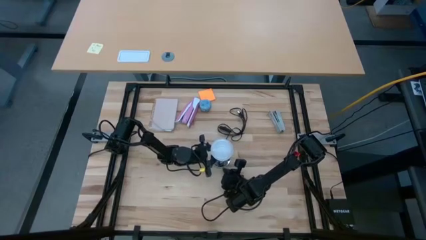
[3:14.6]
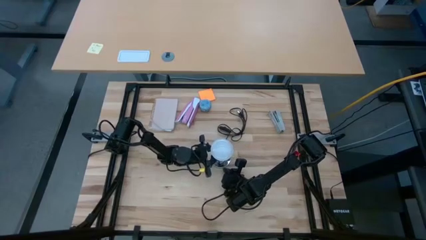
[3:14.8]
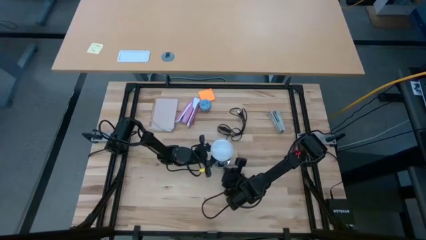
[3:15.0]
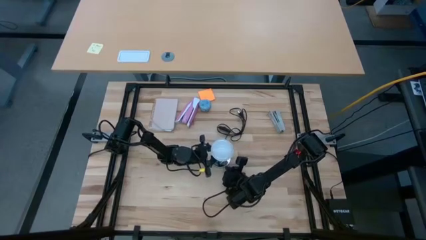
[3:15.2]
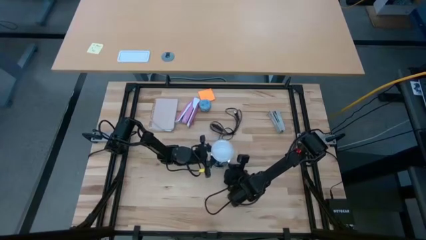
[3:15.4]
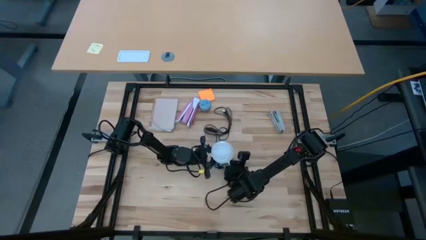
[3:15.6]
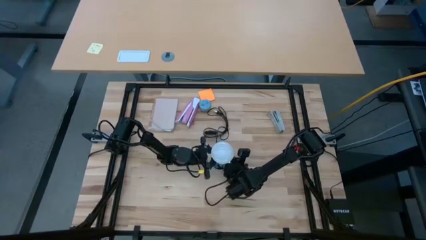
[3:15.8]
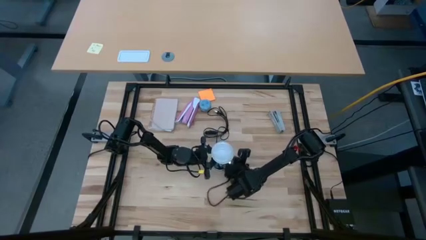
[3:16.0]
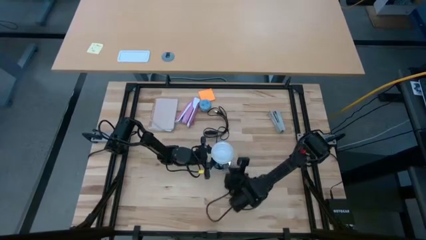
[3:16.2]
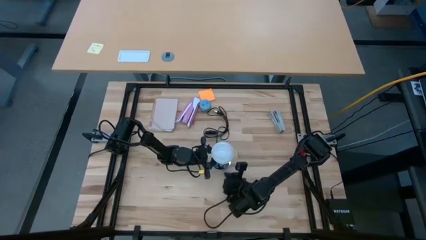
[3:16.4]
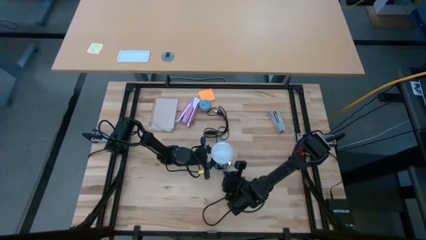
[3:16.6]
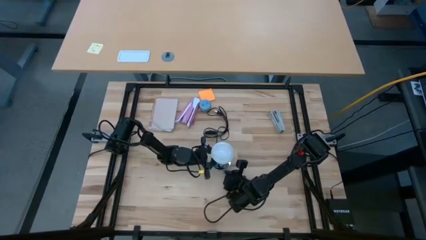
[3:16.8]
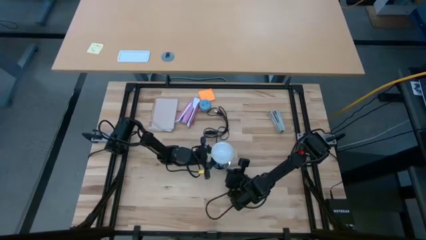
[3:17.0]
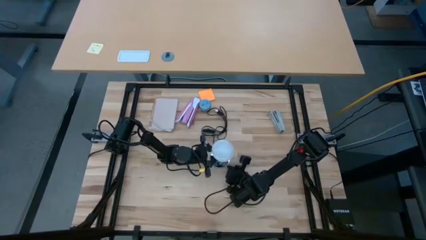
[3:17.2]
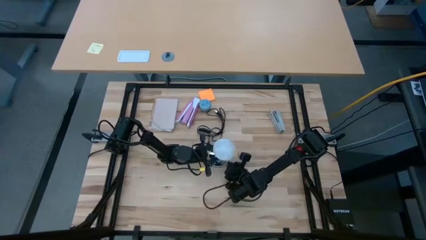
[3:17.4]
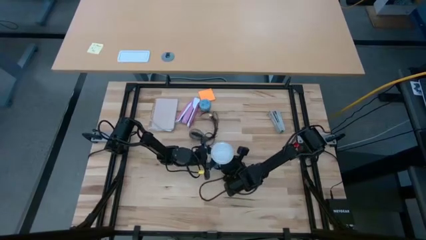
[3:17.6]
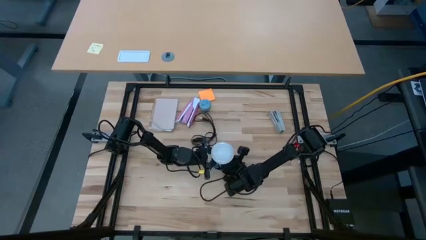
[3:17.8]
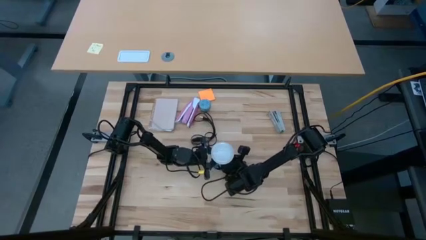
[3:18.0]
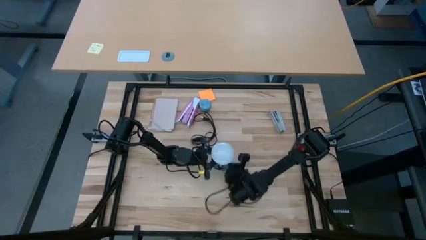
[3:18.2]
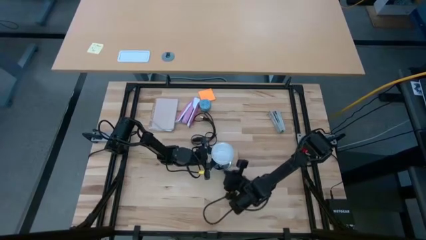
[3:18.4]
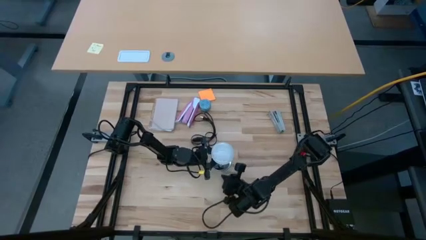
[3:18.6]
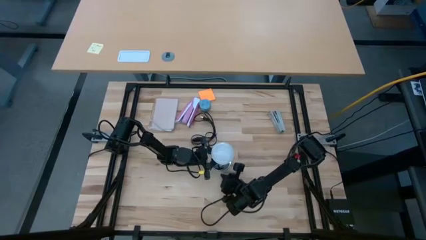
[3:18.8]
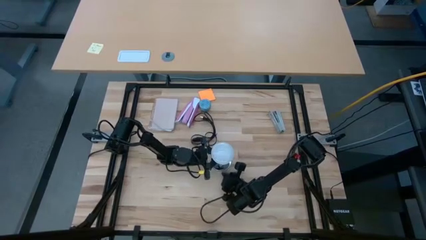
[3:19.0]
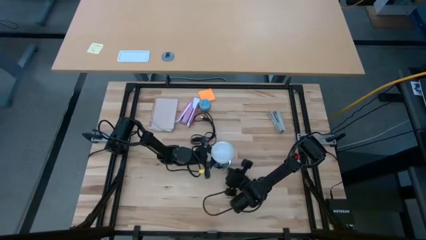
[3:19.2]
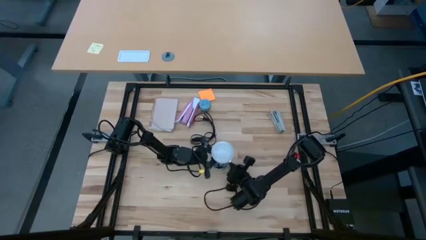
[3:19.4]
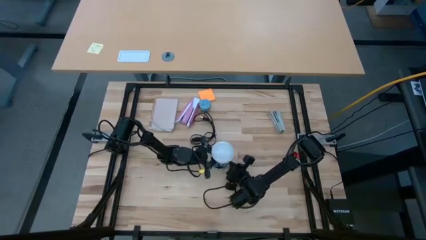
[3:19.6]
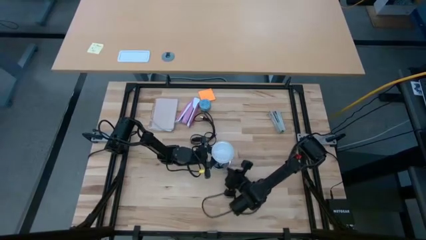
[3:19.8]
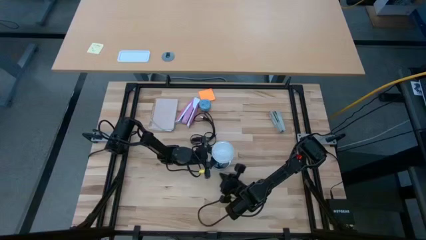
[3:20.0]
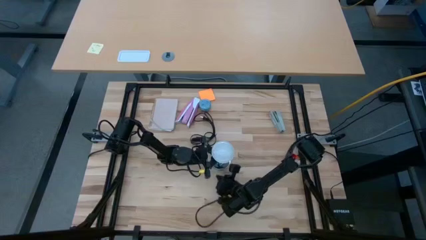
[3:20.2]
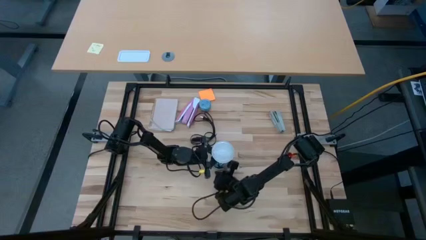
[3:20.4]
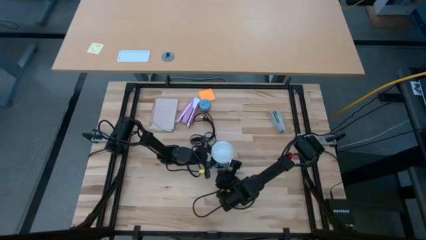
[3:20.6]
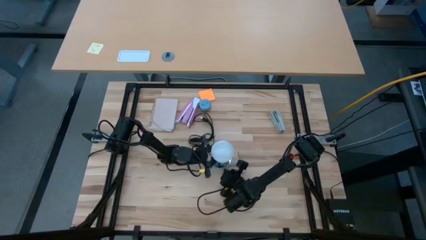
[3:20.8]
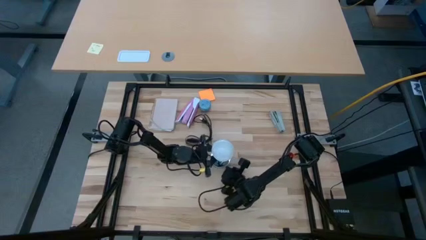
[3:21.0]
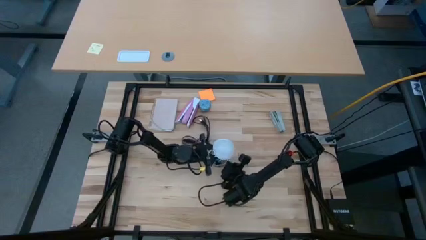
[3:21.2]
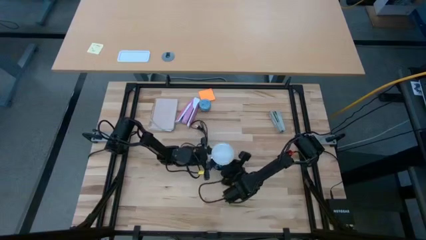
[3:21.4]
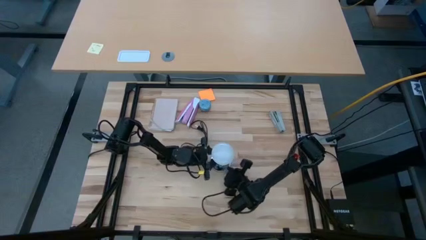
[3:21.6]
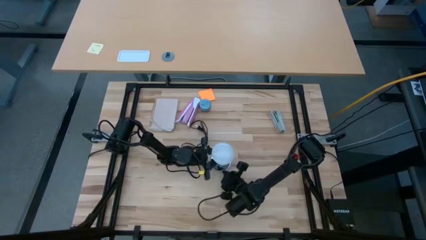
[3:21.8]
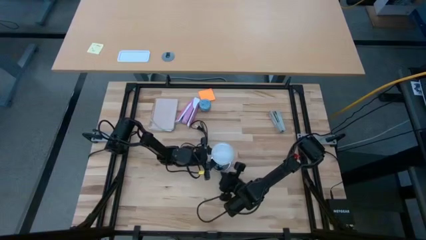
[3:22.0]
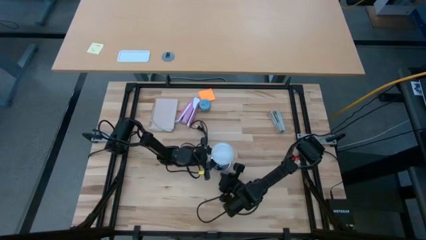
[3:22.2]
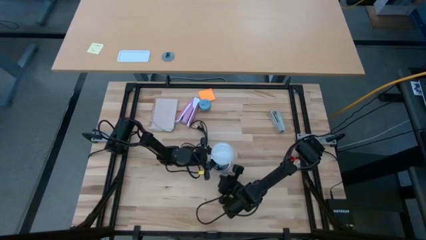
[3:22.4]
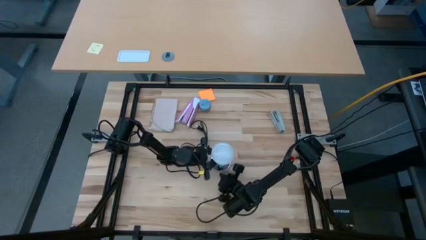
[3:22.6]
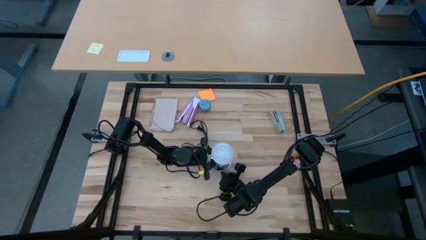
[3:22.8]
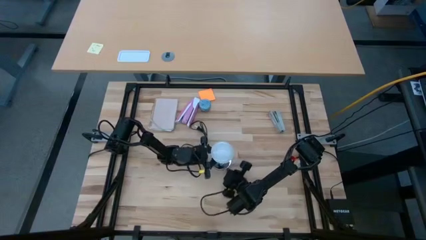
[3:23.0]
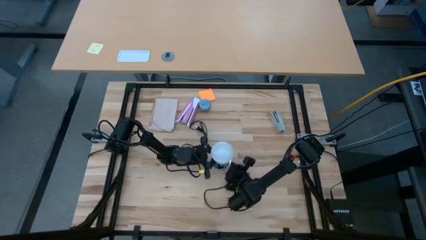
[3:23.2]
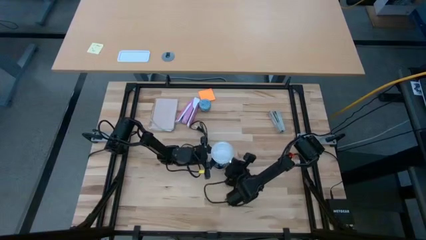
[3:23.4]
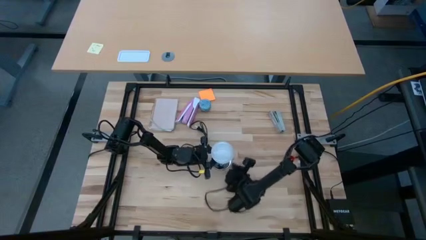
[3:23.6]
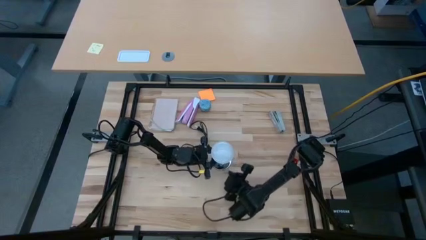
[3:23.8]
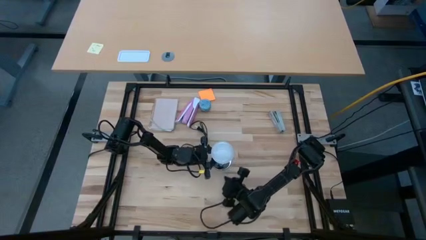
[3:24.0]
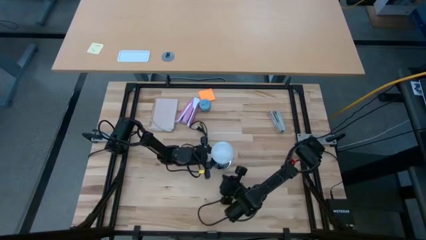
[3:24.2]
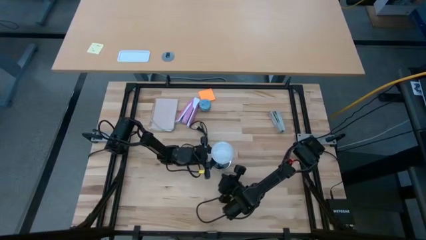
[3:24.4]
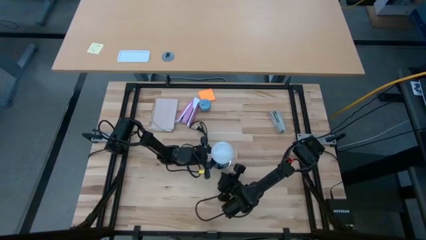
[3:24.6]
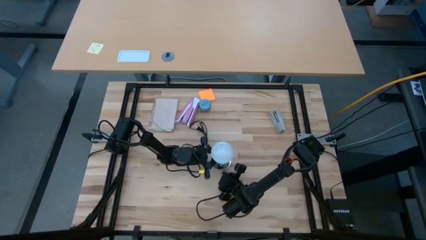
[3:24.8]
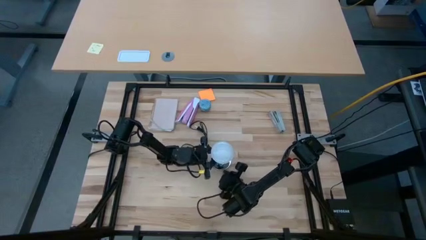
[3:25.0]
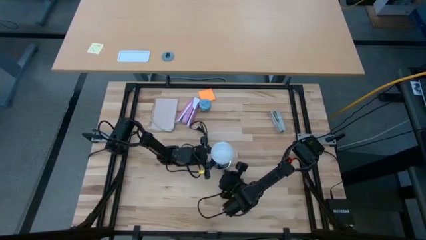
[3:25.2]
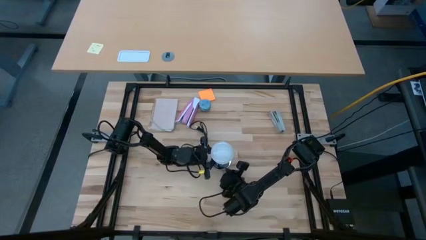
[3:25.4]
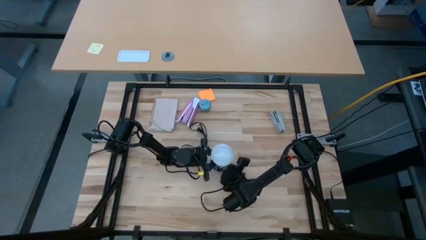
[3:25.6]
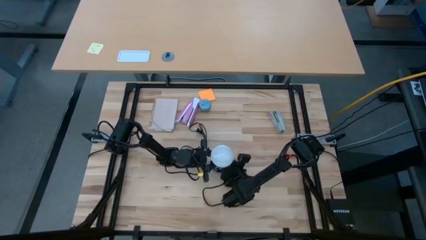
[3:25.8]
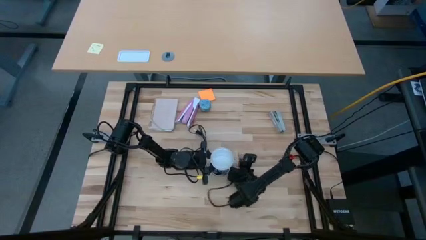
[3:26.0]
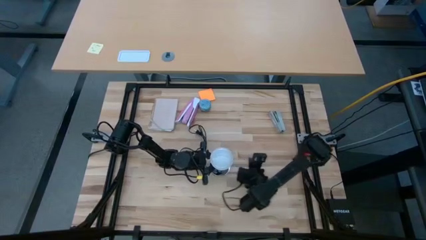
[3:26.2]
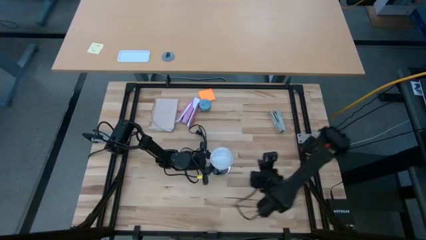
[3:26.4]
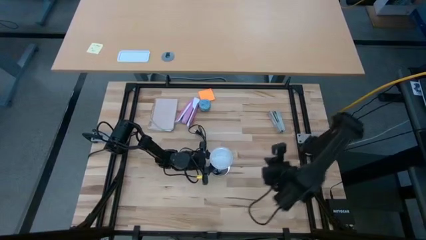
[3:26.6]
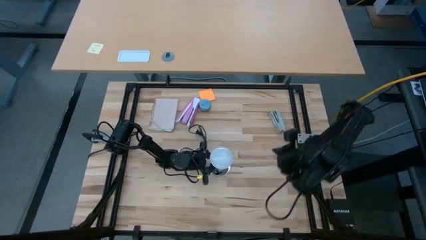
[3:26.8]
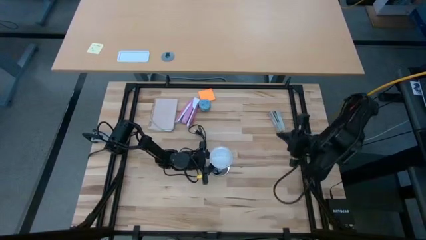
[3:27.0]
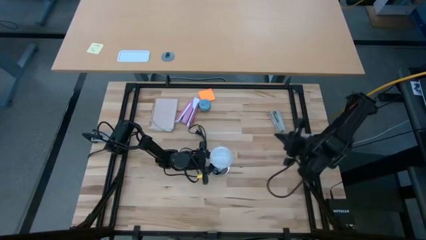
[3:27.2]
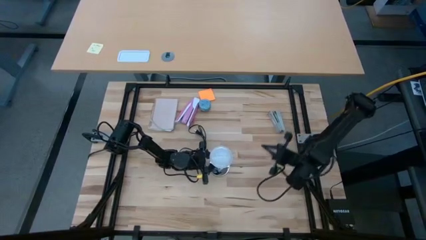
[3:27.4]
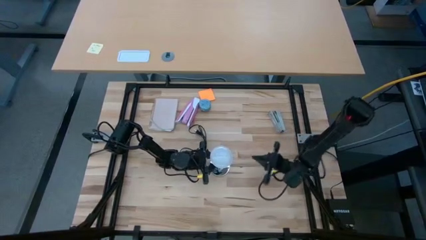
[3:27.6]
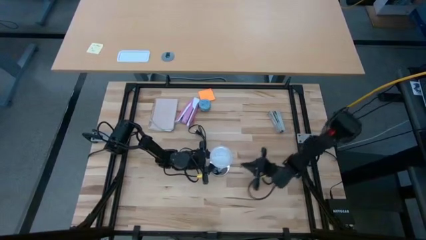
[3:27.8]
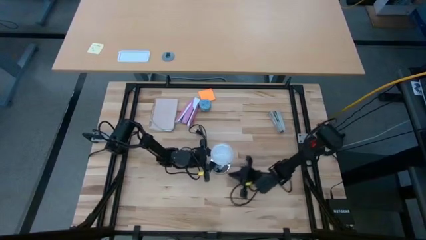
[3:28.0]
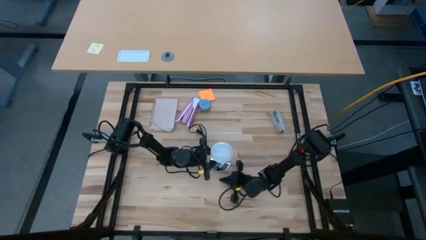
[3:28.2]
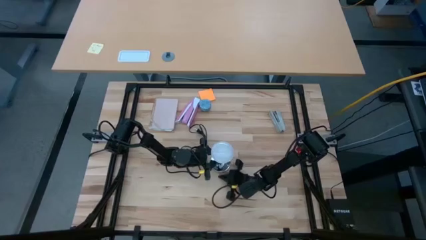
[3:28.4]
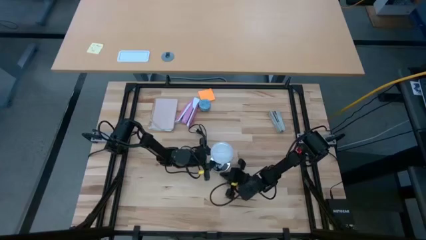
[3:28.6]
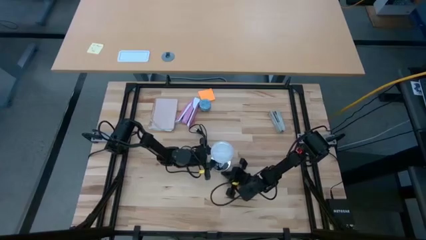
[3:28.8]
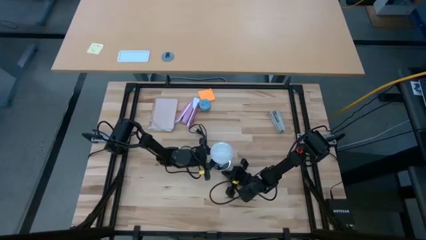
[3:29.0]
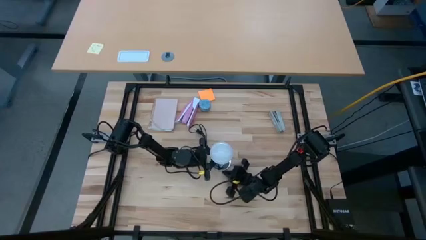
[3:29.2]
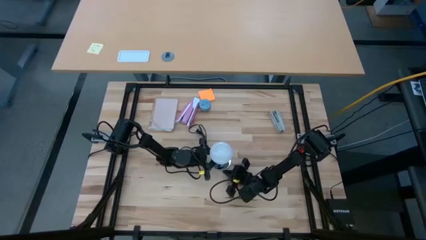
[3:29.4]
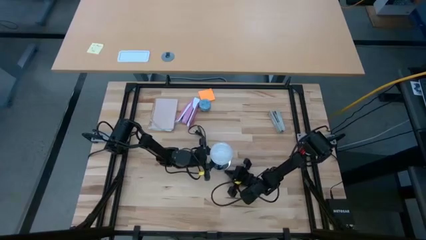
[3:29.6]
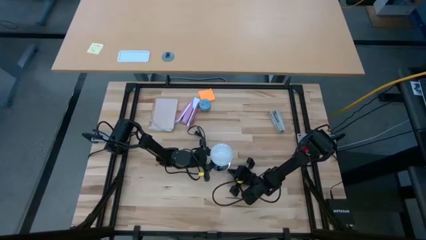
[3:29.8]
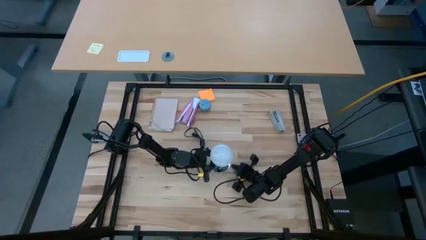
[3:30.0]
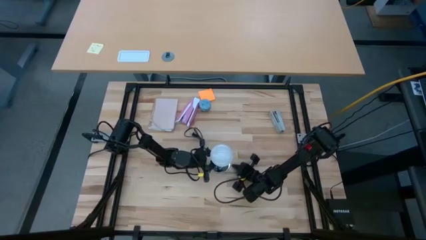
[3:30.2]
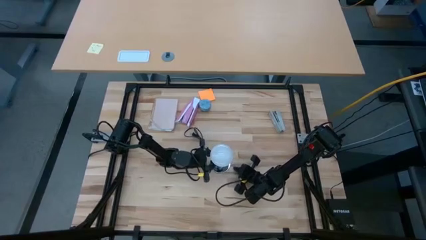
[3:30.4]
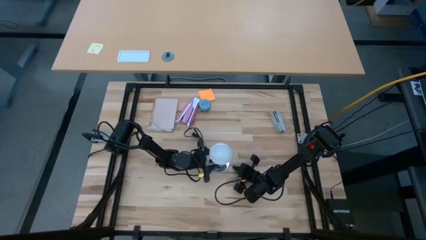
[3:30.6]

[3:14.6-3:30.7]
Task: Screw lightbulb
Insert the lightbulb into the lamp
